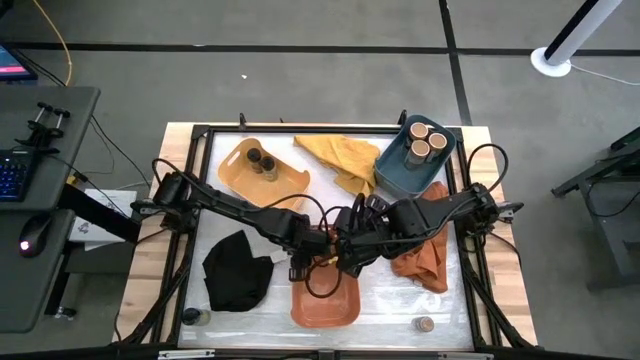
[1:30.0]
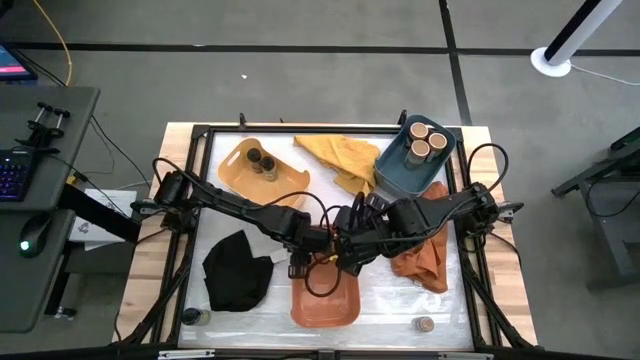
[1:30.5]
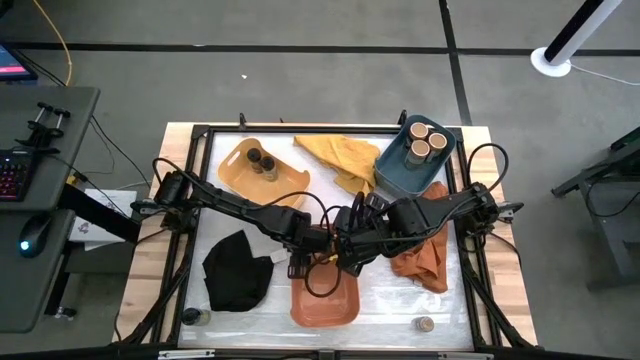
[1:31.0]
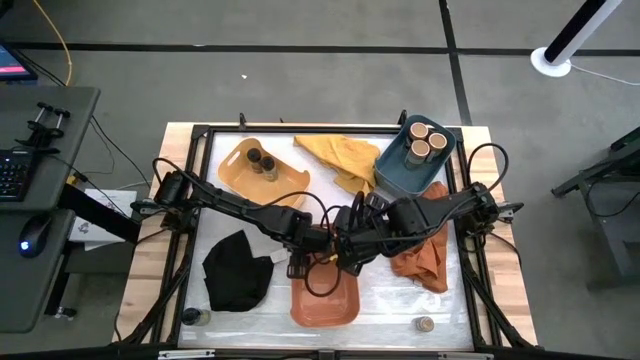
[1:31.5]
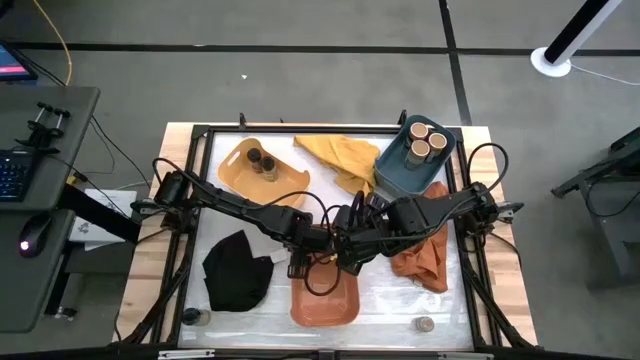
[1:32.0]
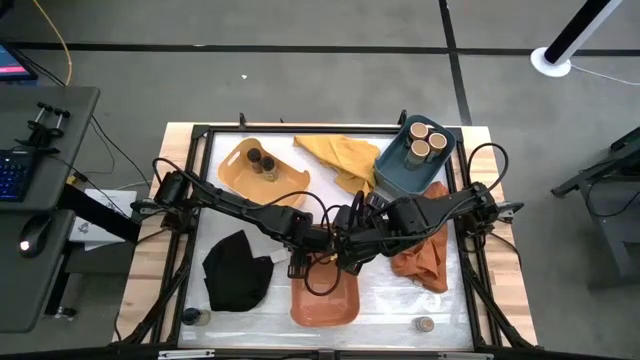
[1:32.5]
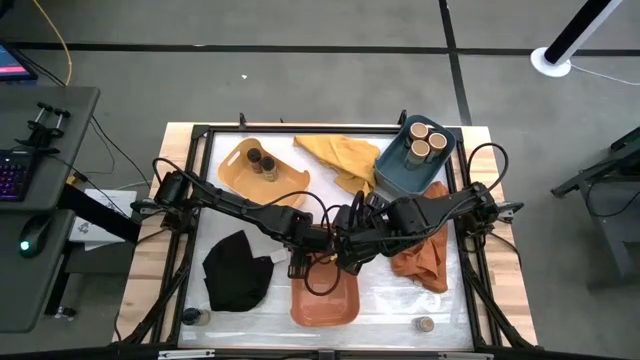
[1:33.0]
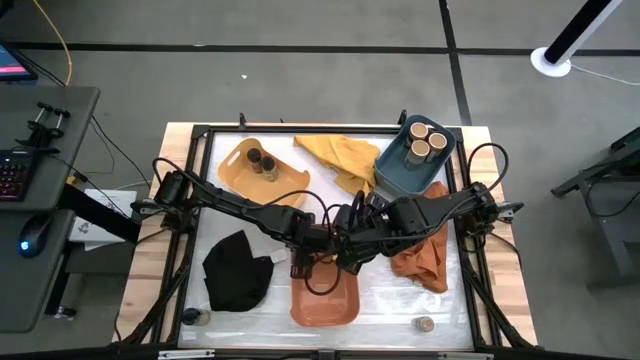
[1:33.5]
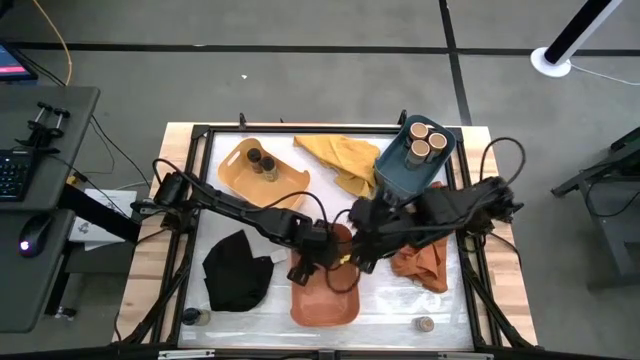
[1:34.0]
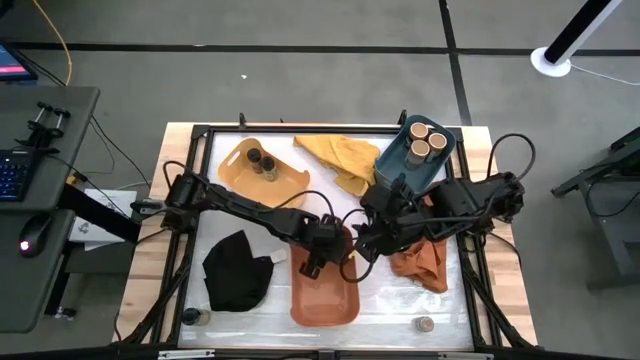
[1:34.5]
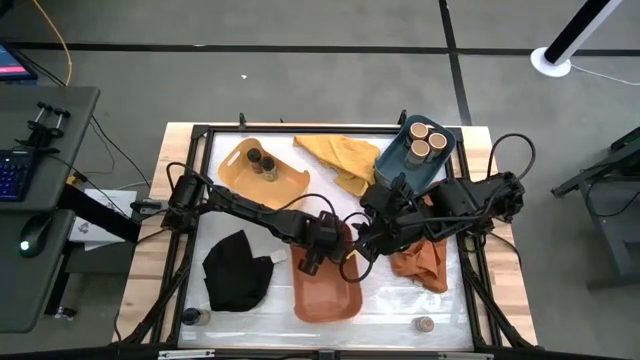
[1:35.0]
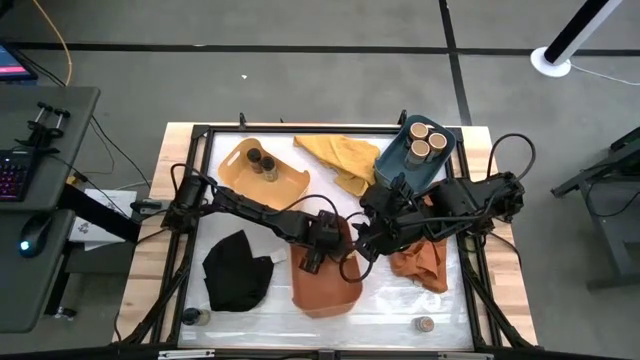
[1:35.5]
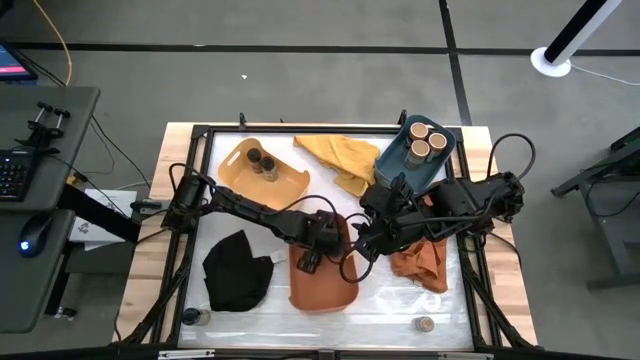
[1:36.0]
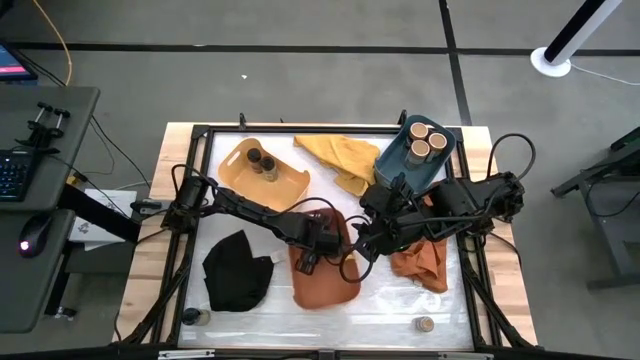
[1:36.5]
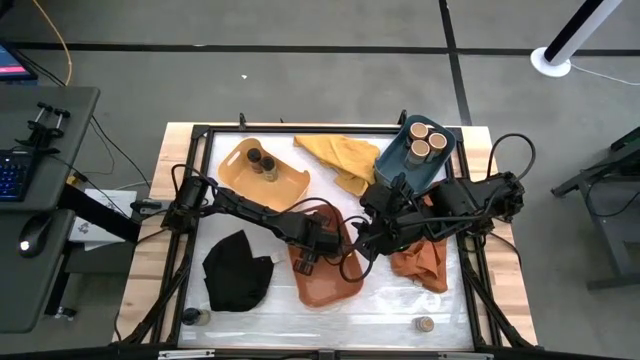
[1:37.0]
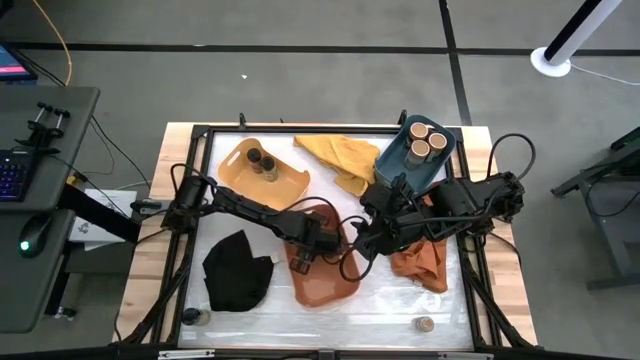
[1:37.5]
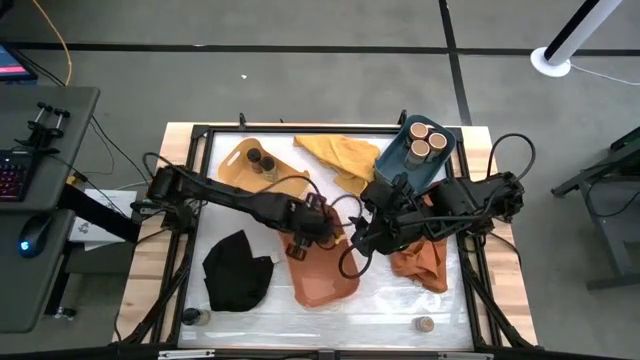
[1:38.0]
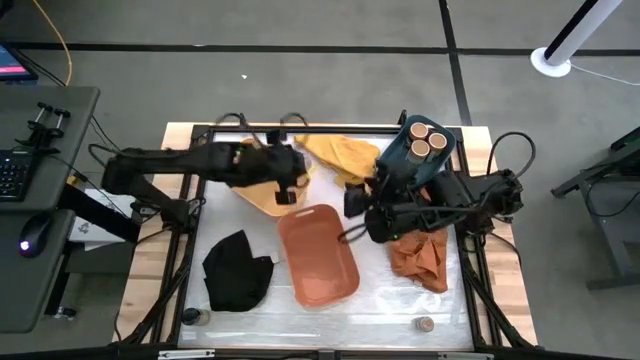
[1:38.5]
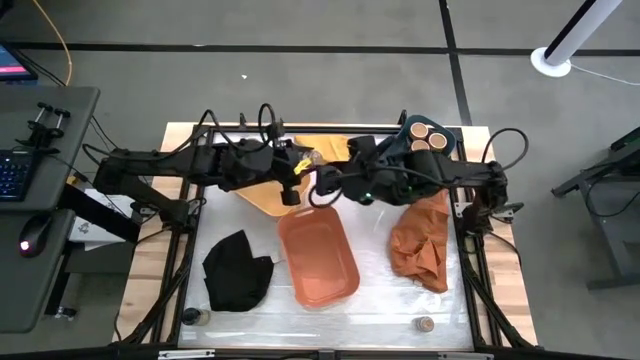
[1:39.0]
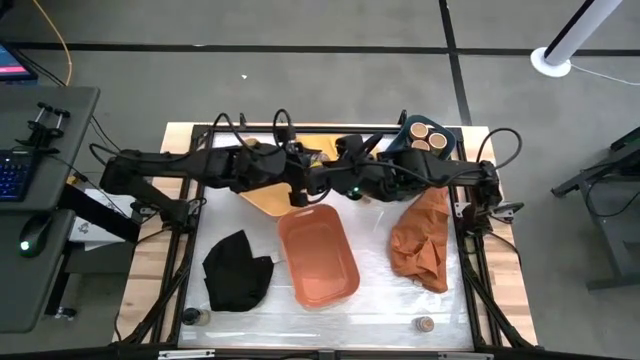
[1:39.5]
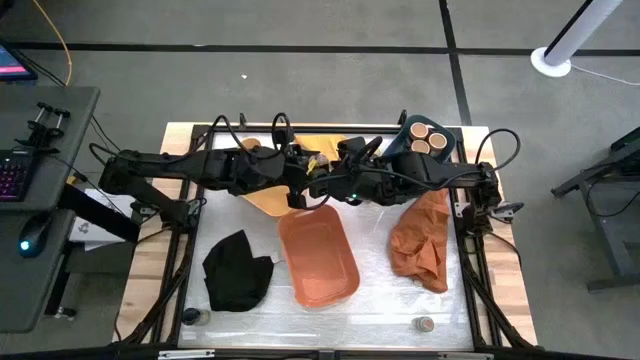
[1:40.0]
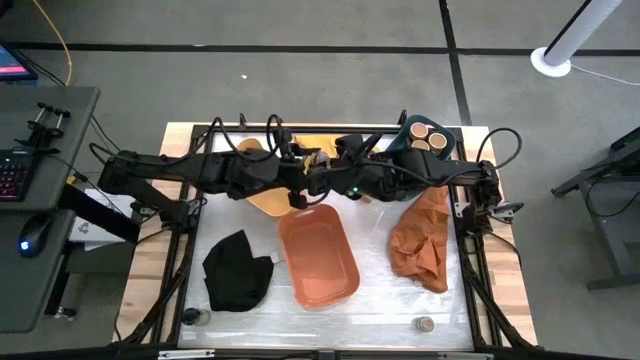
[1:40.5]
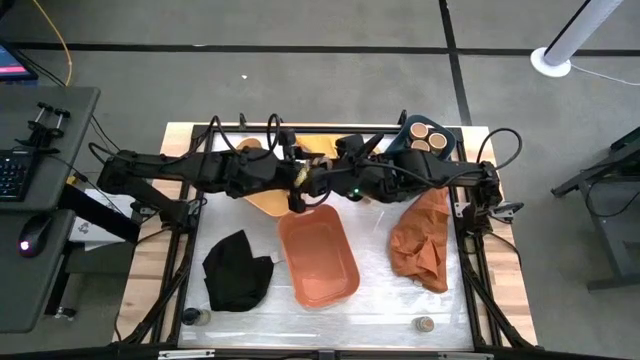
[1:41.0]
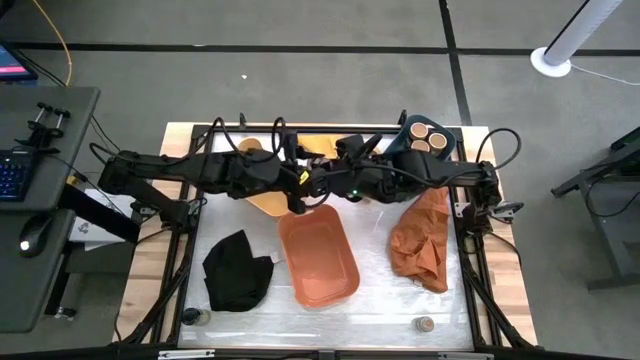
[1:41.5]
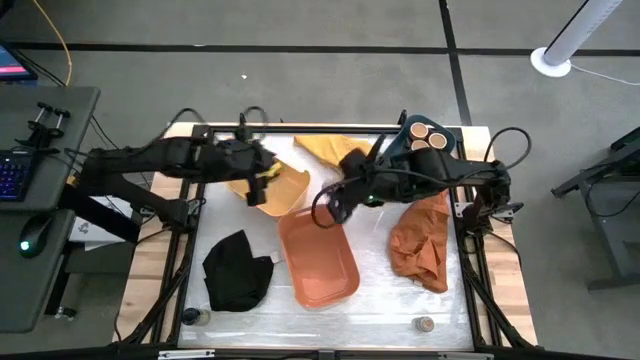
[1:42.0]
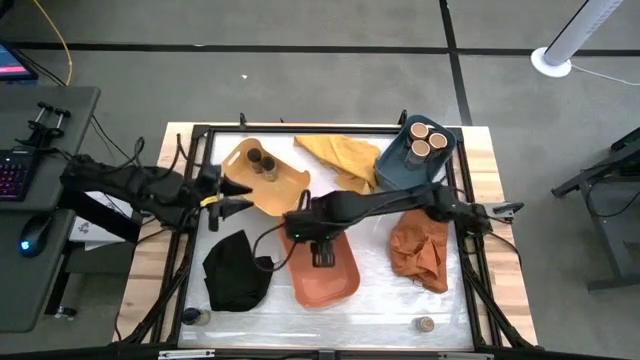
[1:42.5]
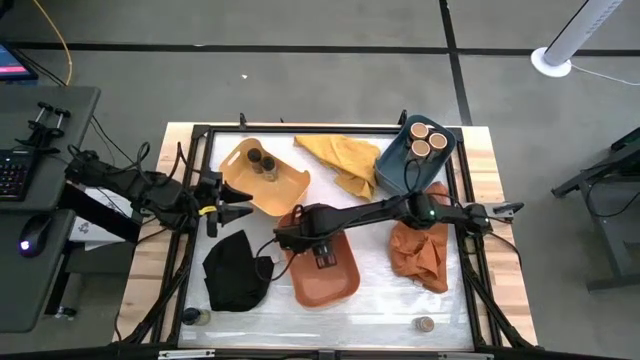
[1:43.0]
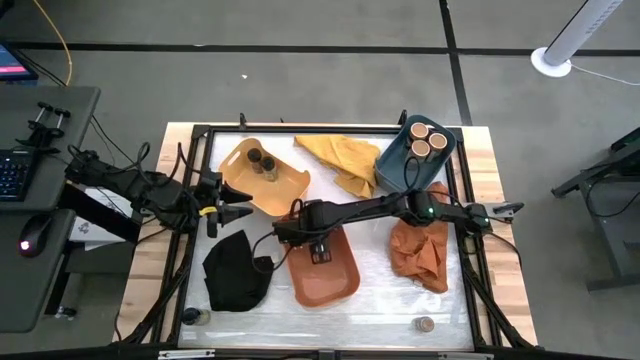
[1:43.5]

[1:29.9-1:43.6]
Task: Sort spices by type
Put the top brown seasoning bottle into the orange bin

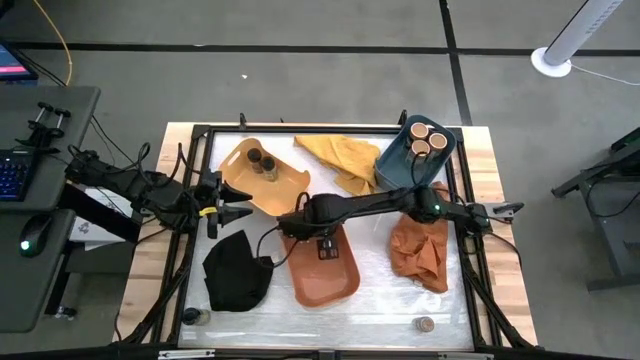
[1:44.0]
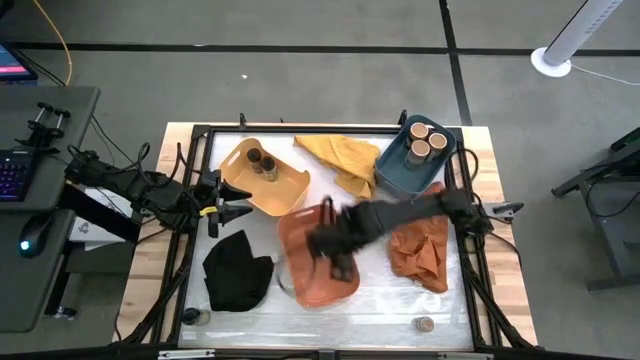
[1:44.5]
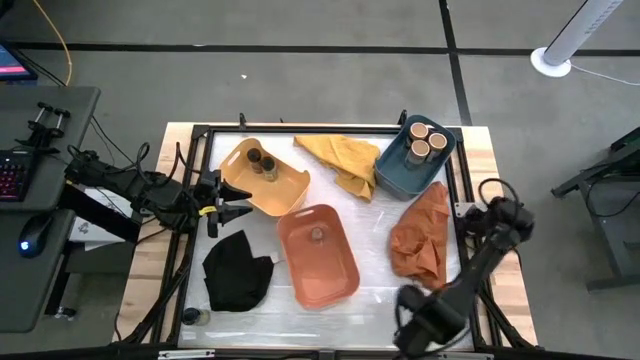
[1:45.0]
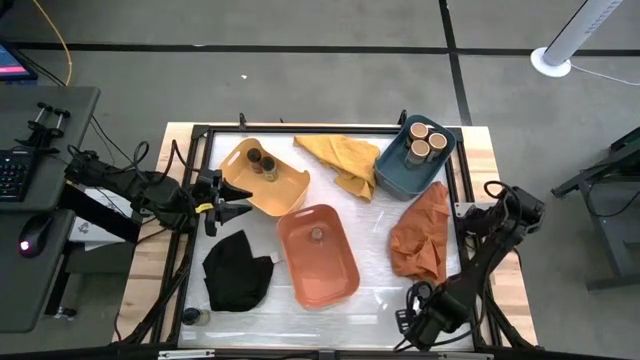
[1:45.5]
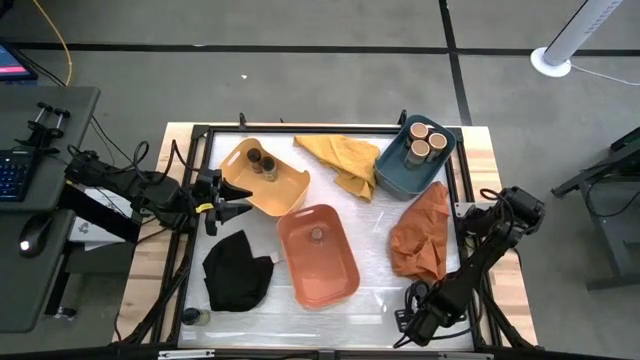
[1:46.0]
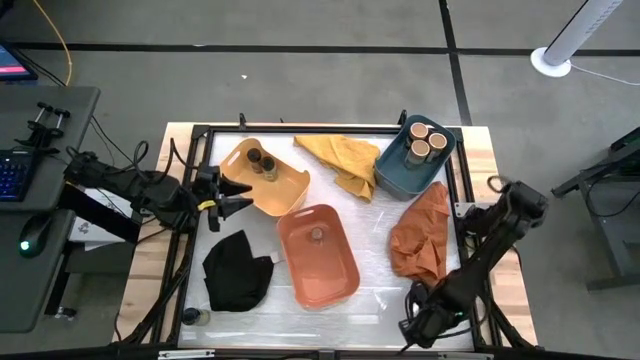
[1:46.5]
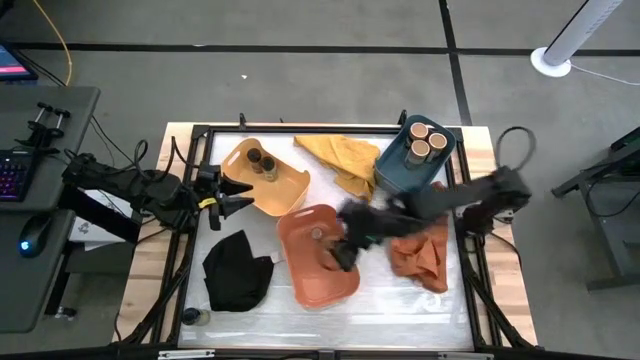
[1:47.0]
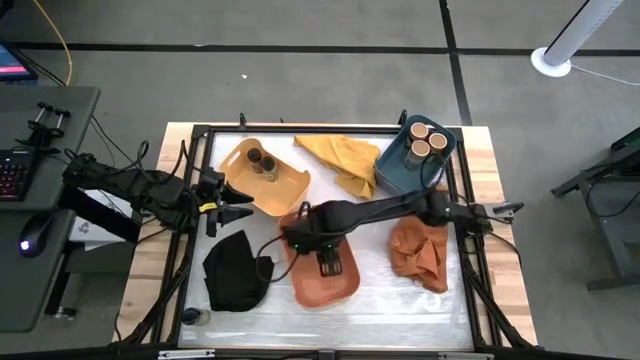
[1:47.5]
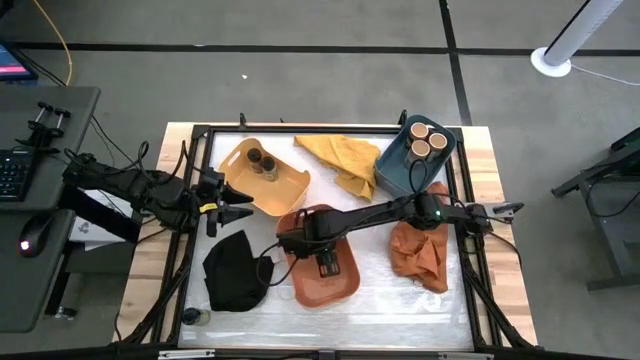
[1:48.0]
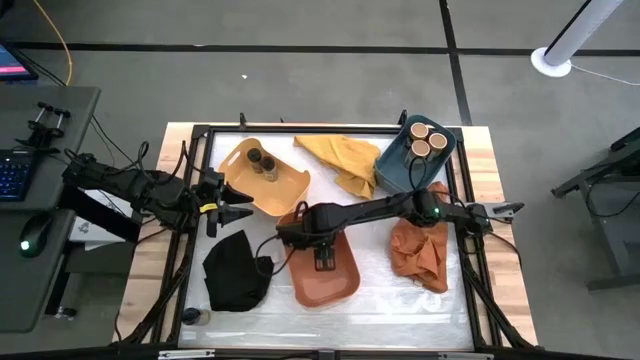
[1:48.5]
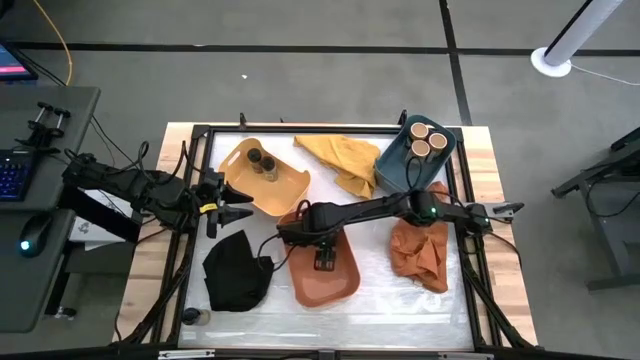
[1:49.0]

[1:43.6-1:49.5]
Put the brown seasoning bottle into the orange bin

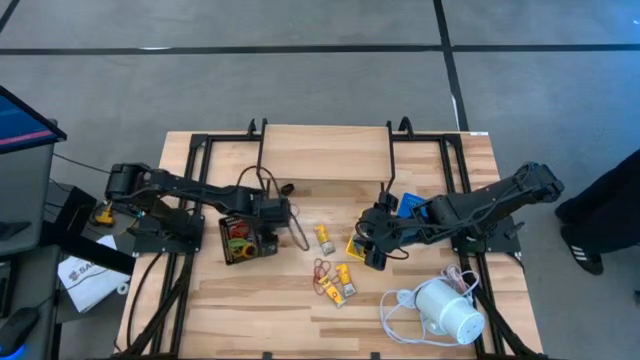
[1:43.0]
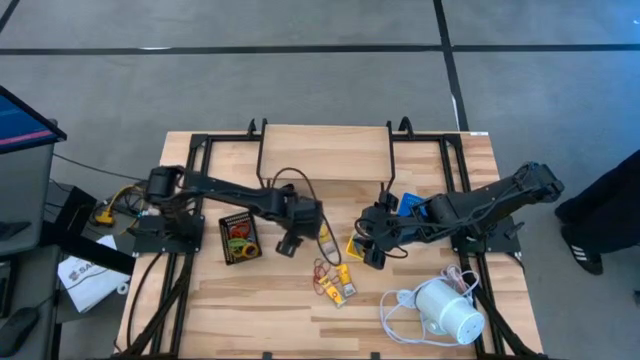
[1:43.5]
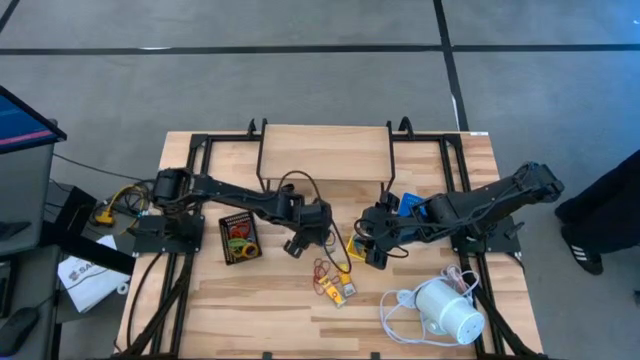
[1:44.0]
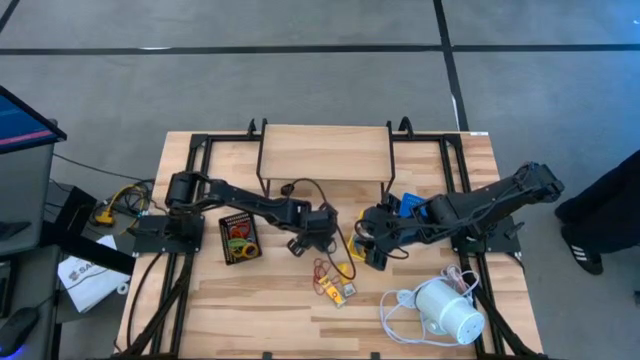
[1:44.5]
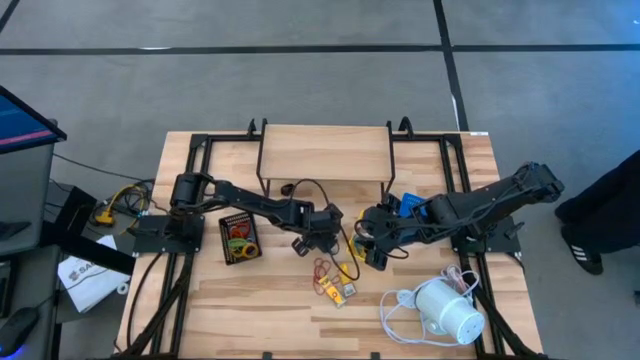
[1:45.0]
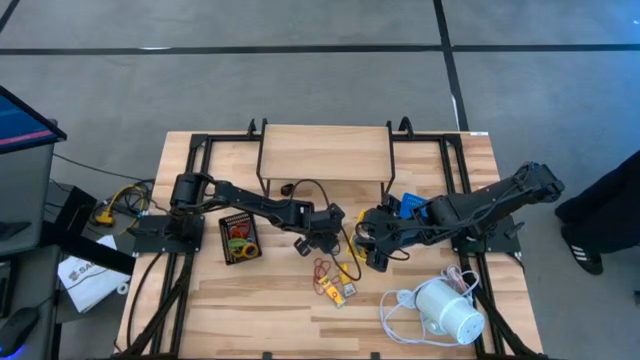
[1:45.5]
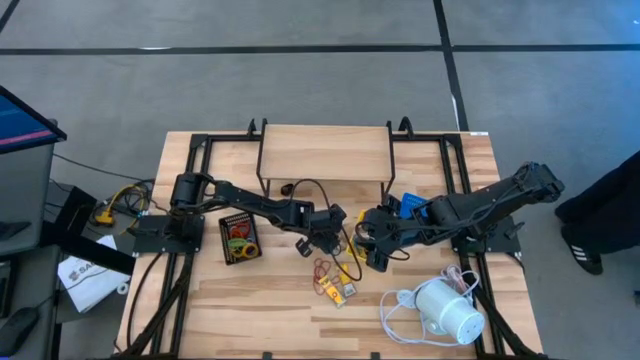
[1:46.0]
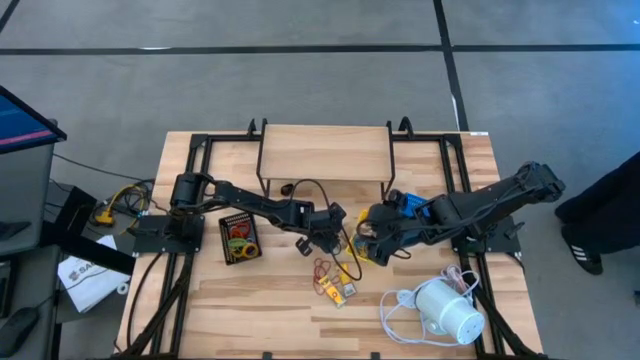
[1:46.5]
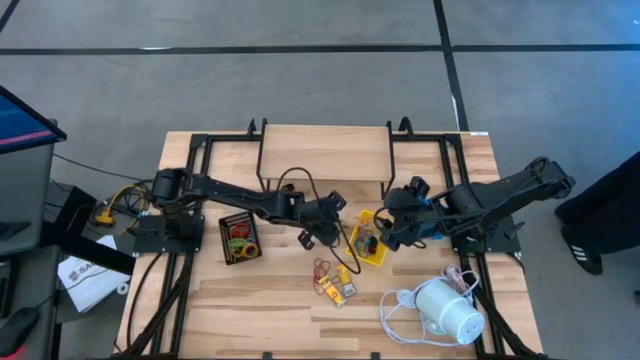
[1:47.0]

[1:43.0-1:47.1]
Task: Pick & Place Office Desk Supplies
Put the yellow crayon box into the blue bin
